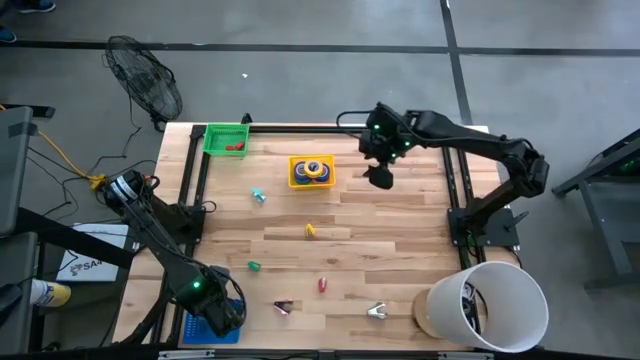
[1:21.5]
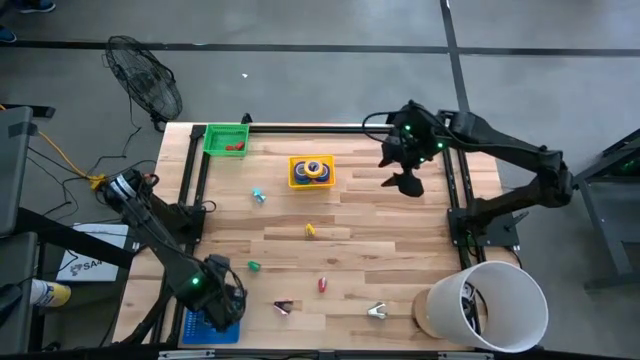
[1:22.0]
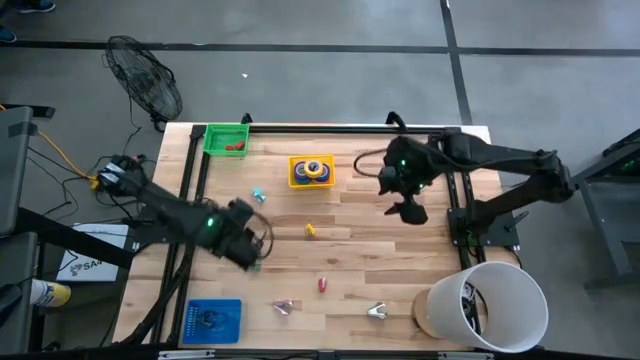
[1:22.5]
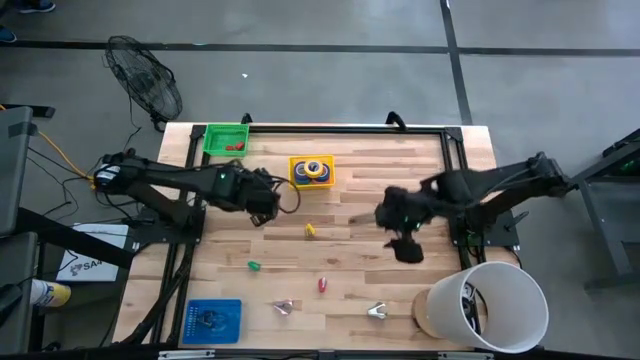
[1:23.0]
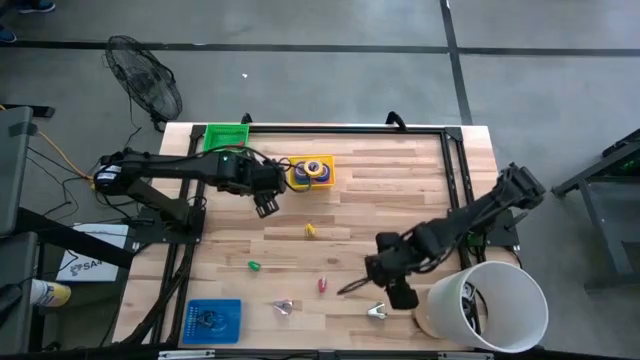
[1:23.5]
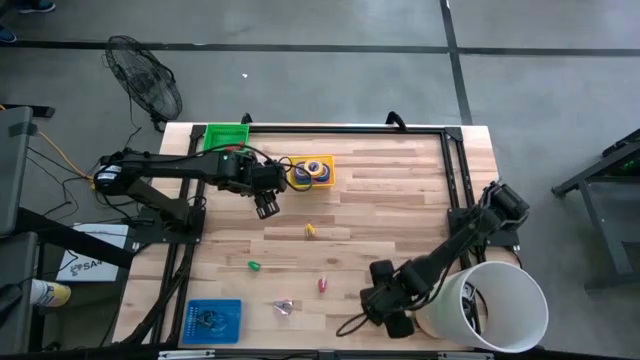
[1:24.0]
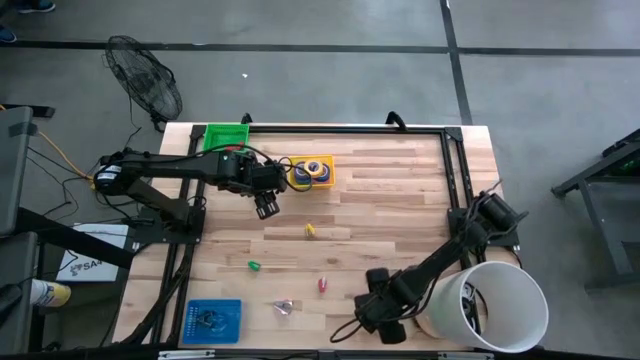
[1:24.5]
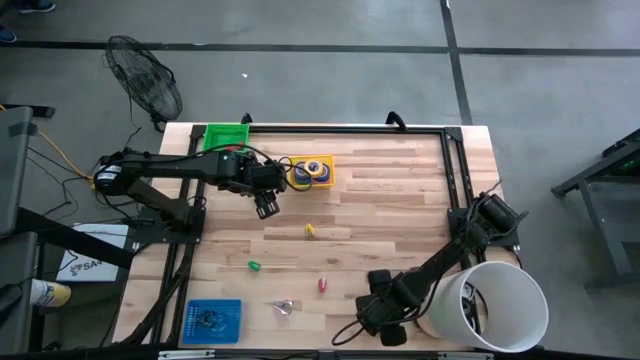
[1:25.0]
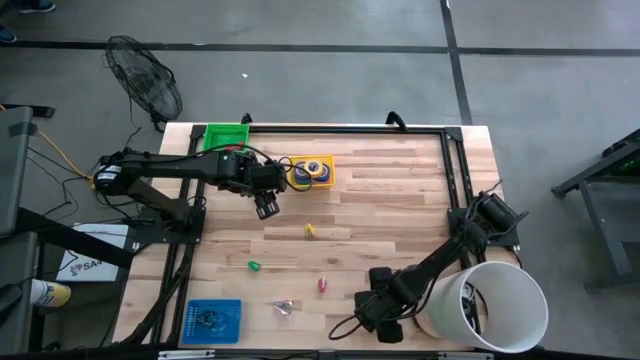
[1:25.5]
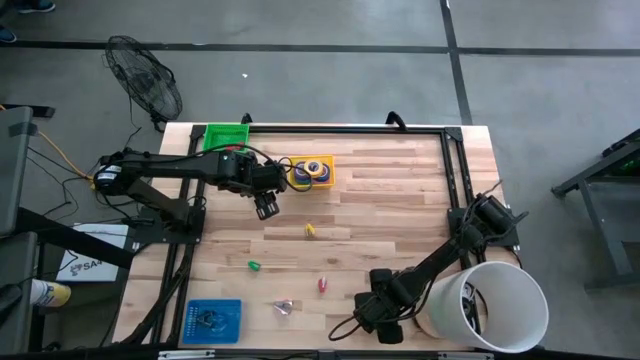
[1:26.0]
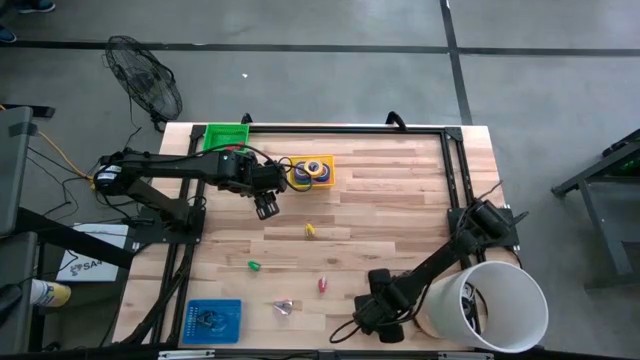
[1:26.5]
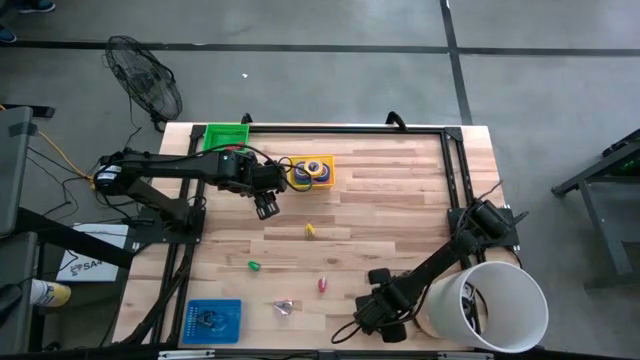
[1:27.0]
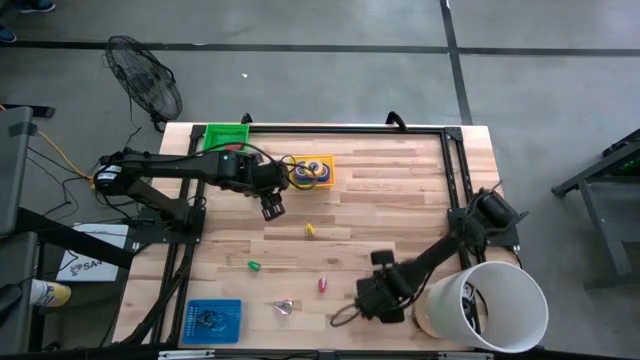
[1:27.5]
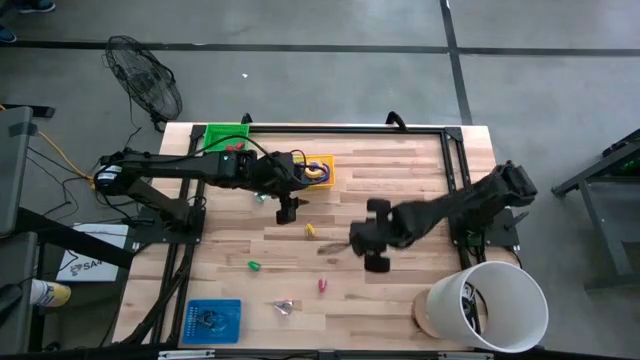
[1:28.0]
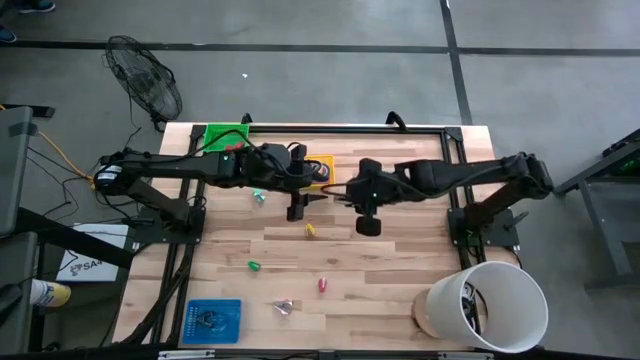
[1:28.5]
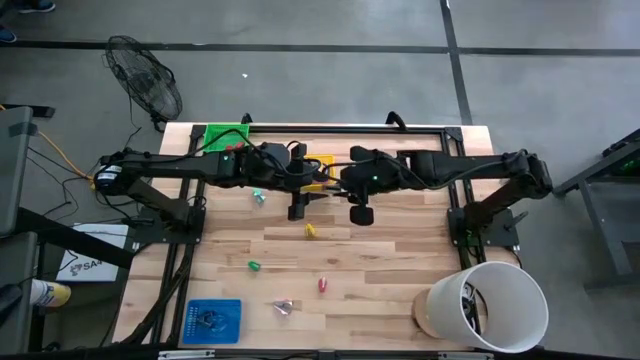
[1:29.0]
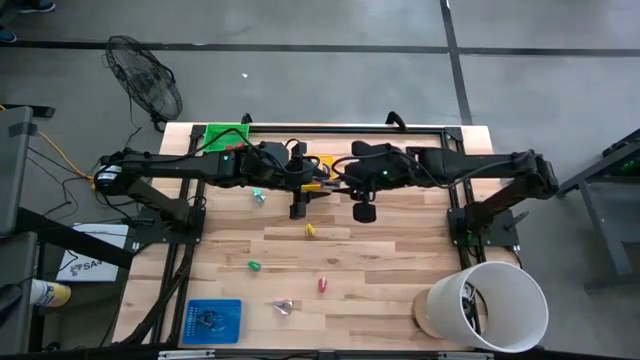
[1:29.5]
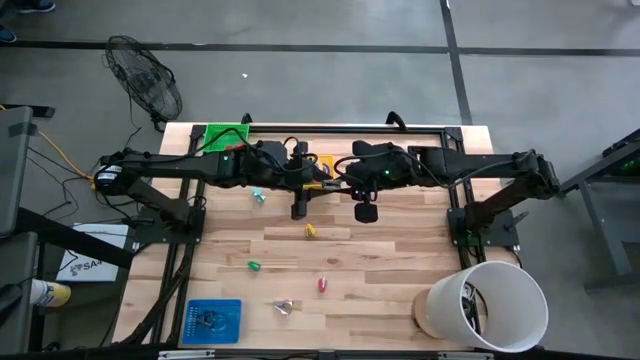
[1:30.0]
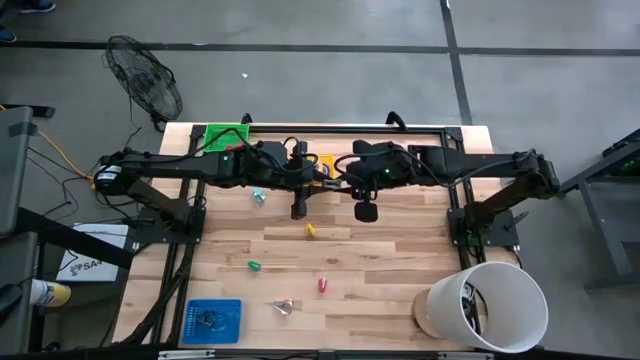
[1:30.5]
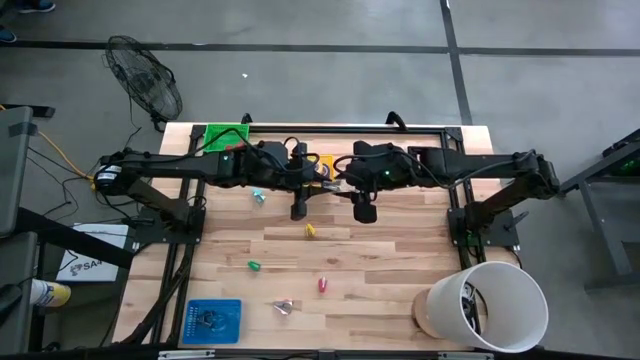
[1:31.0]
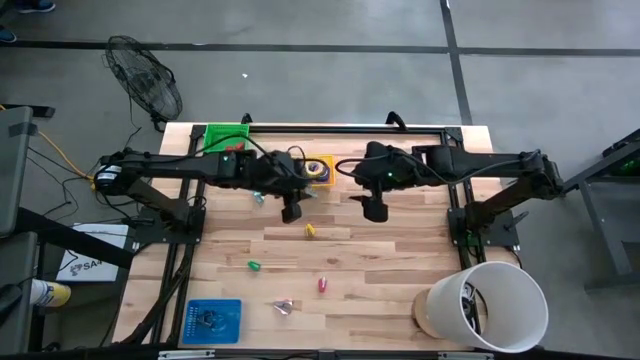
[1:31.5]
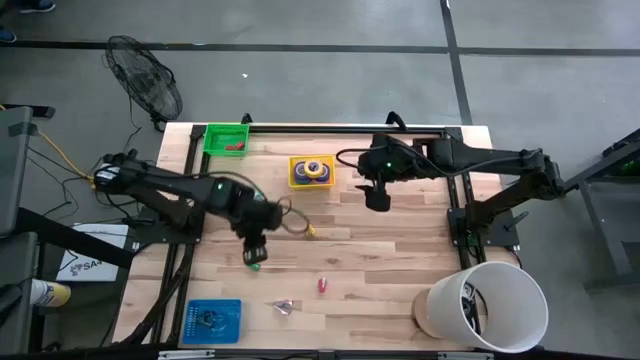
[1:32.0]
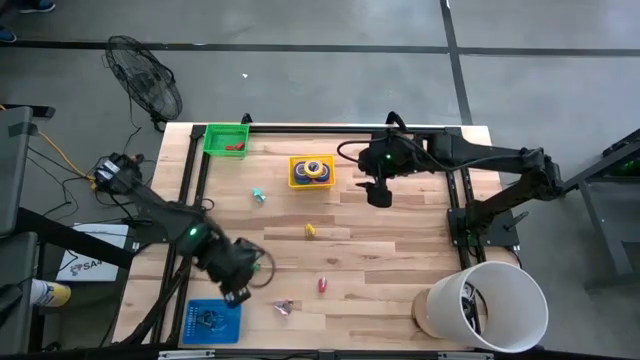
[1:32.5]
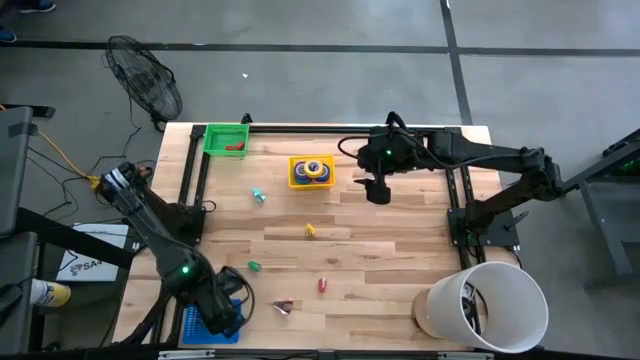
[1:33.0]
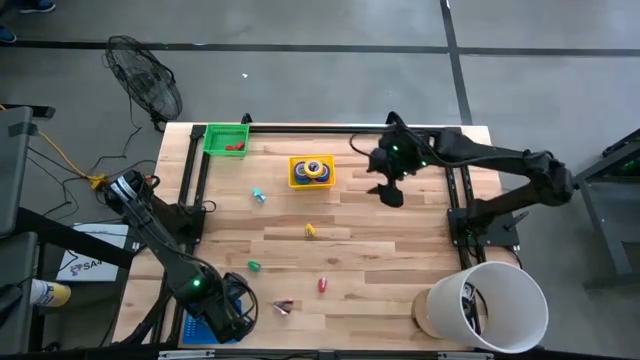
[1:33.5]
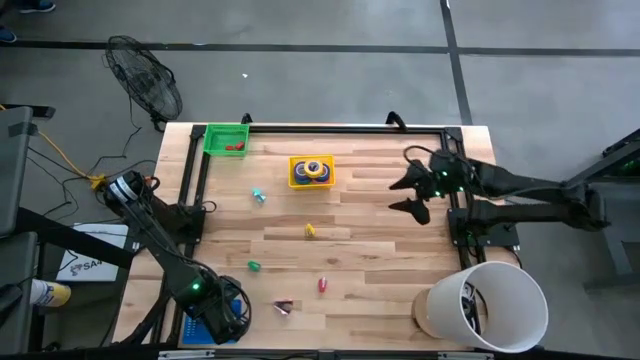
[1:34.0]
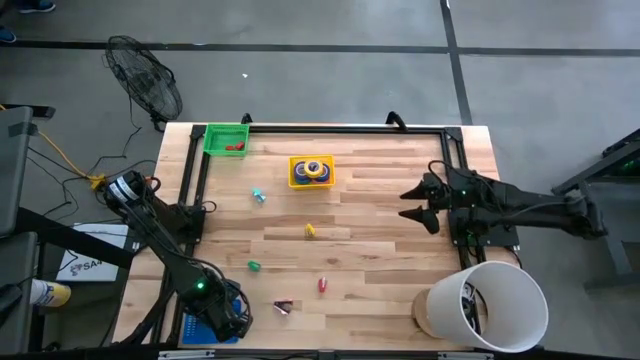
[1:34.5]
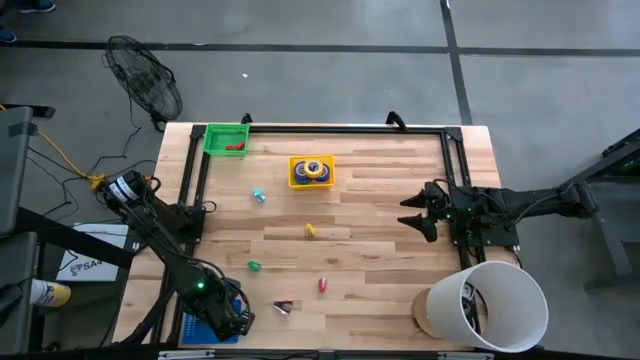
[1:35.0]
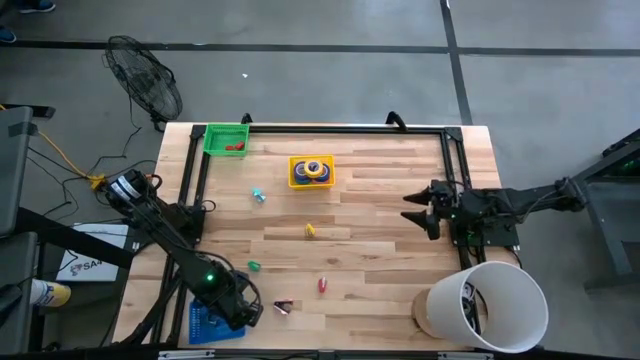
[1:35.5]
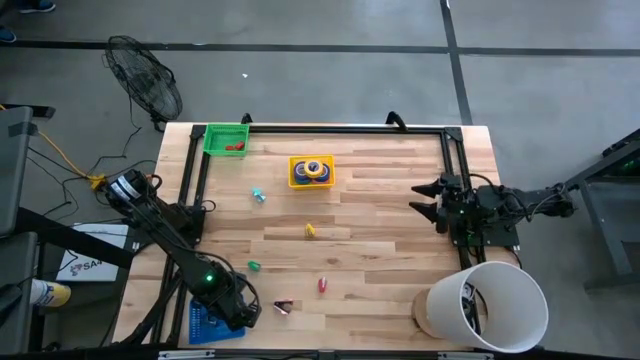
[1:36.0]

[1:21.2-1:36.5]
Task: Pick and place Stapler, Stapler remover, tape
Put the light gray staple remover into the blue bin

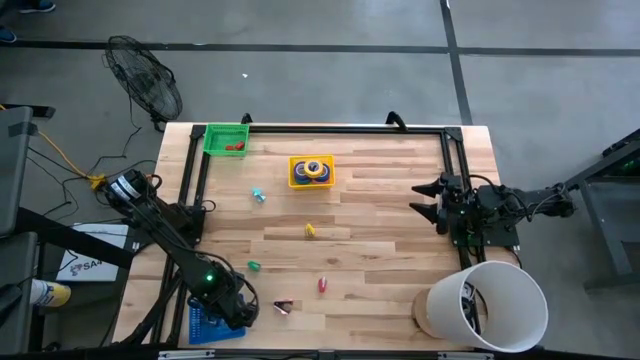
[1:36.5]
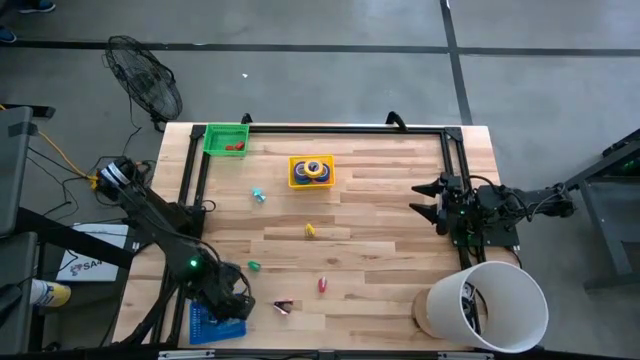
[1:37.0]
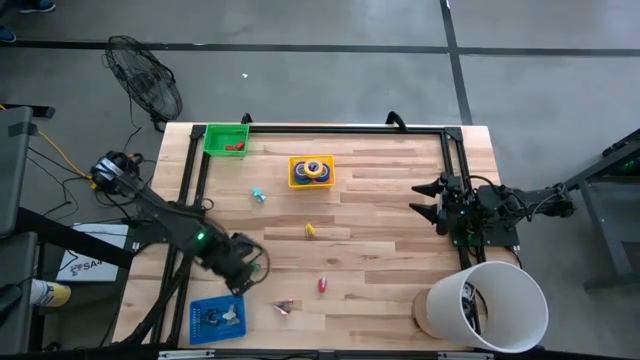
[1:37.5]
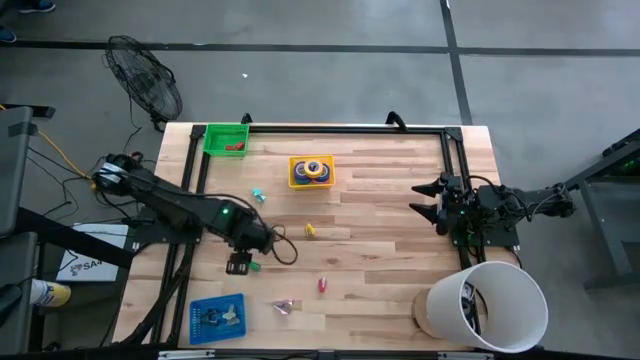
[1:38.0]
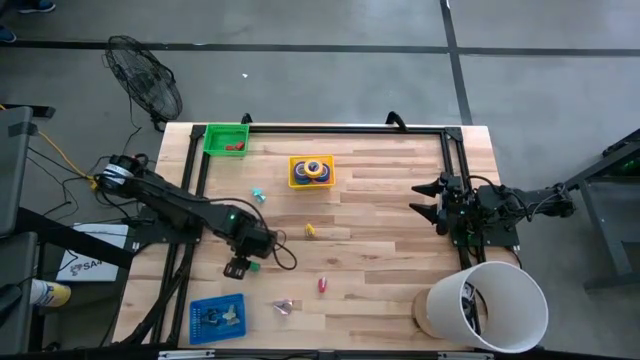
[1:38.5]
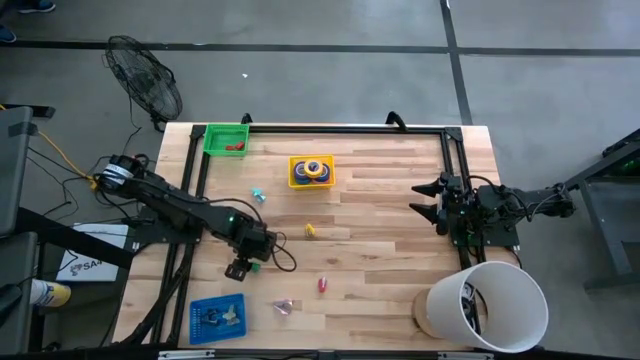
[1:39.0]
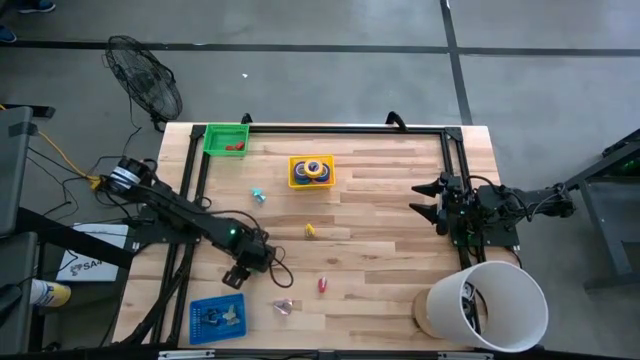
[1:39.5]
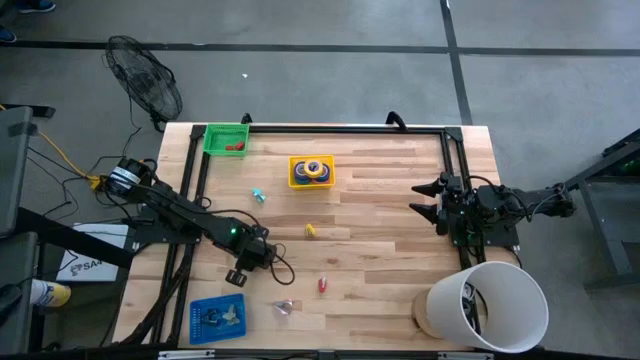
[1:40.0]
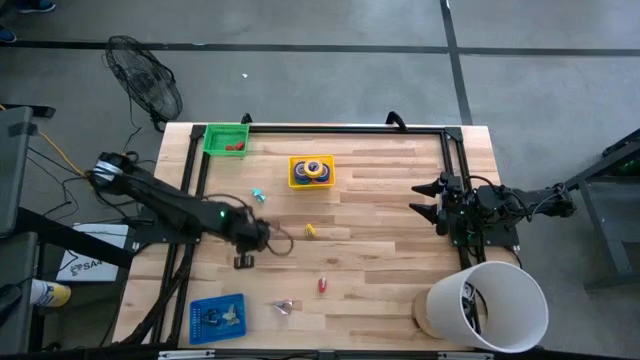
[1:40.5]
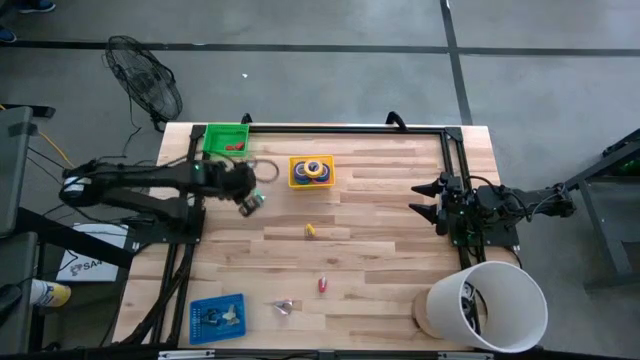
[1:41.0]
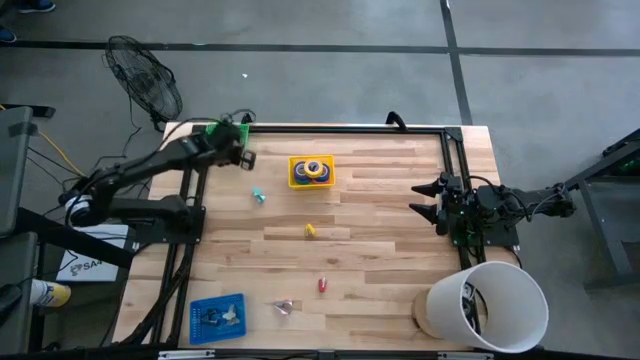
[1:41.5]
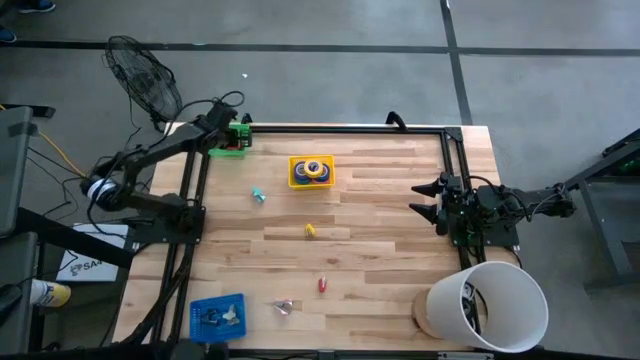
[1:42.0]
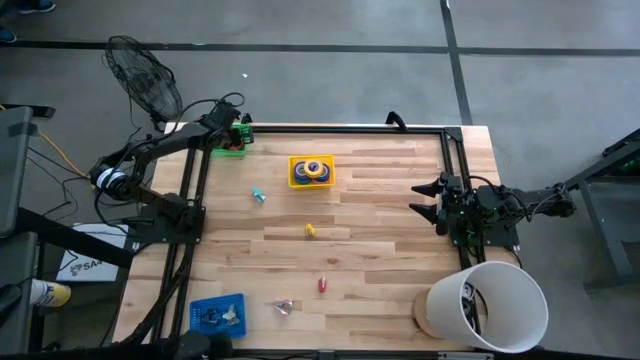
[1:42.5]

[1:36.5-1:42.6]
Put the green stapler into the green bin
